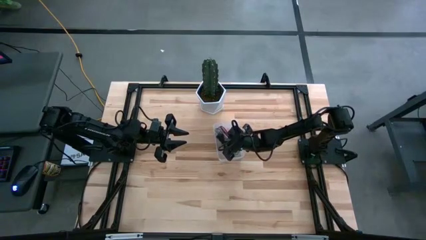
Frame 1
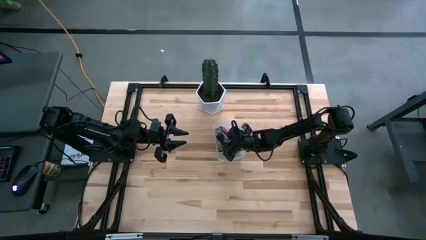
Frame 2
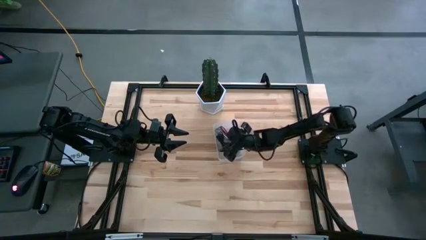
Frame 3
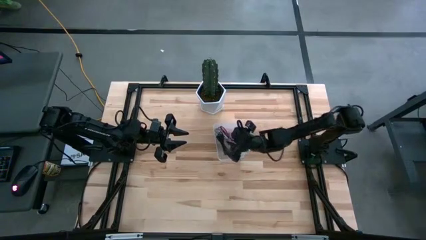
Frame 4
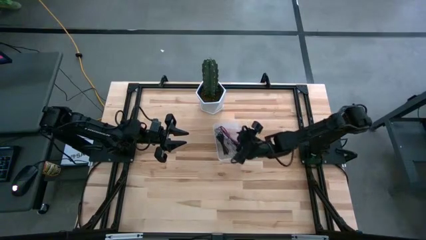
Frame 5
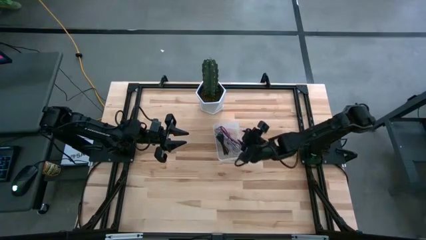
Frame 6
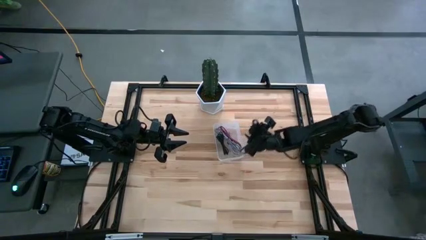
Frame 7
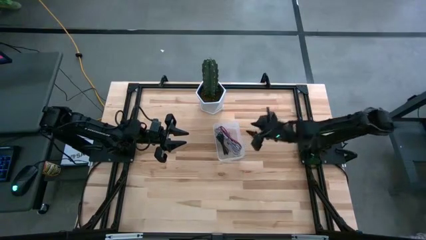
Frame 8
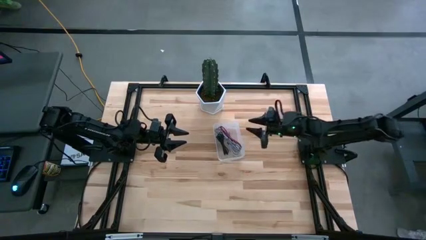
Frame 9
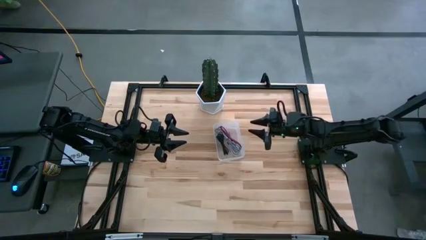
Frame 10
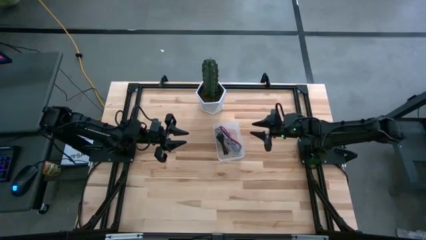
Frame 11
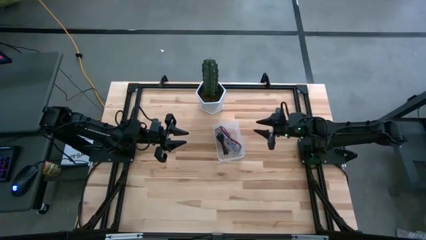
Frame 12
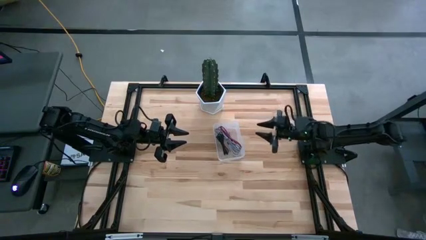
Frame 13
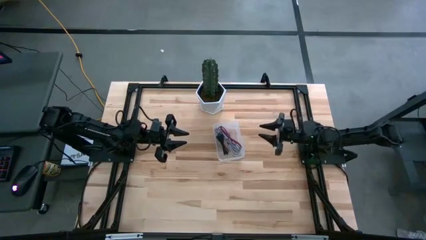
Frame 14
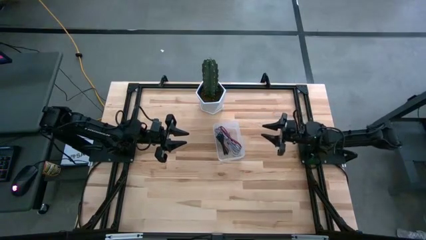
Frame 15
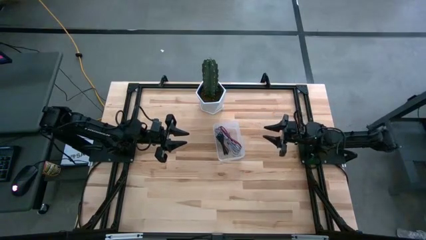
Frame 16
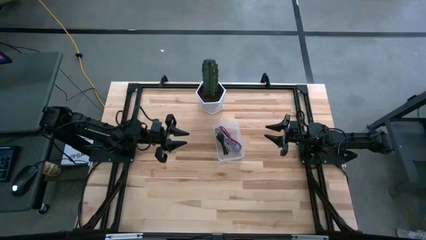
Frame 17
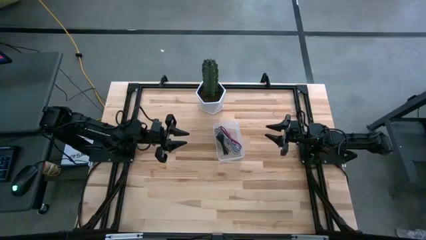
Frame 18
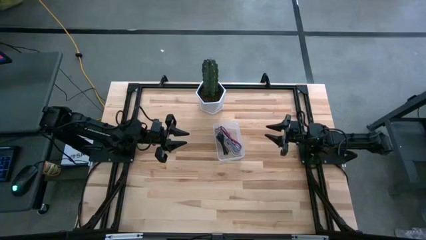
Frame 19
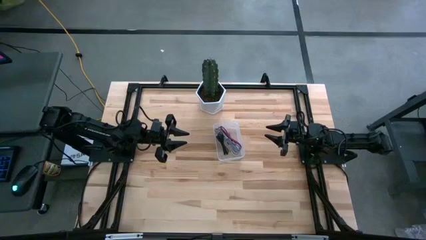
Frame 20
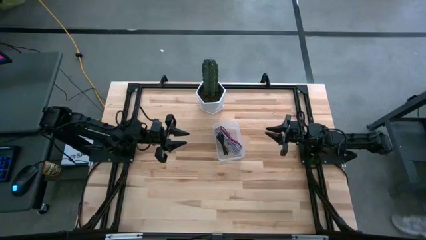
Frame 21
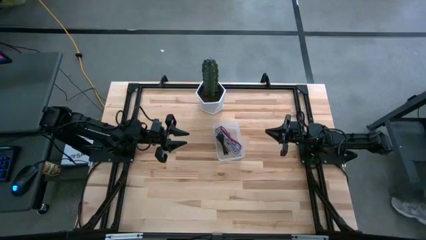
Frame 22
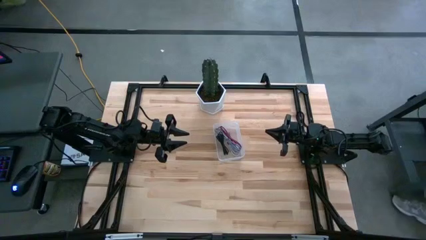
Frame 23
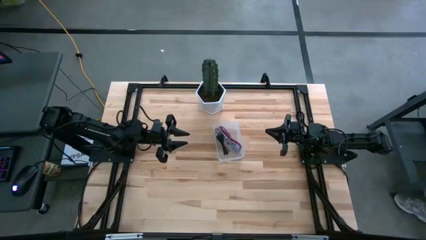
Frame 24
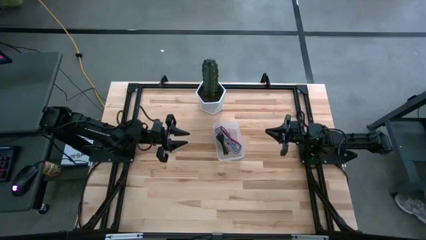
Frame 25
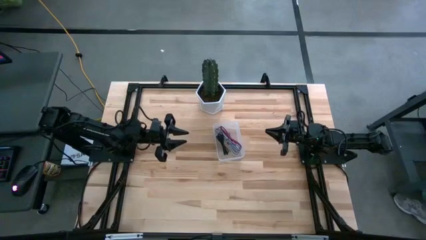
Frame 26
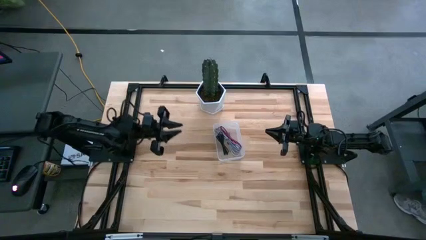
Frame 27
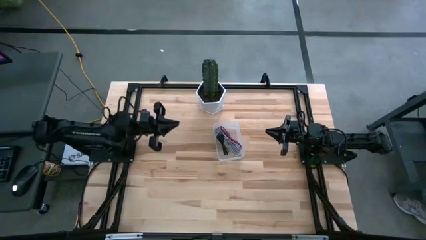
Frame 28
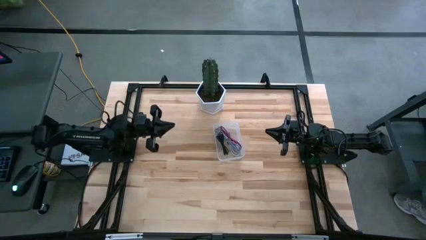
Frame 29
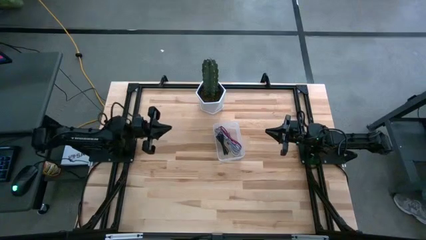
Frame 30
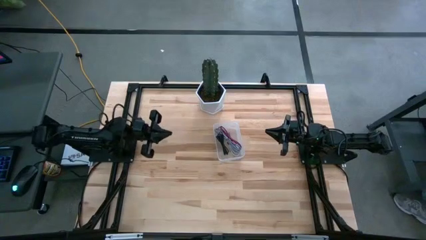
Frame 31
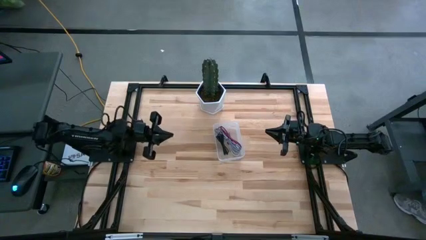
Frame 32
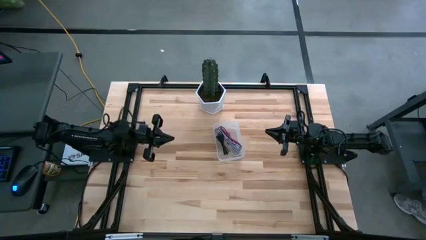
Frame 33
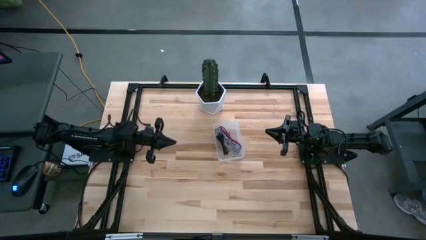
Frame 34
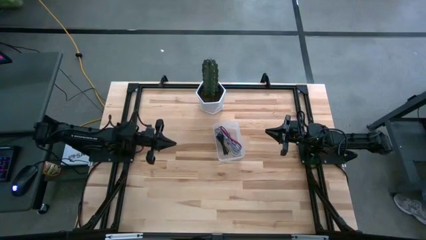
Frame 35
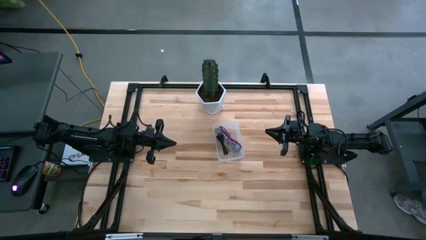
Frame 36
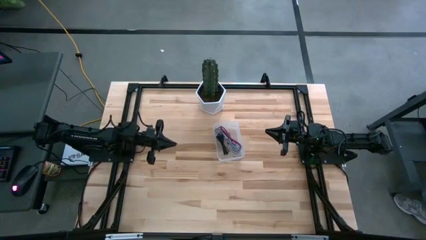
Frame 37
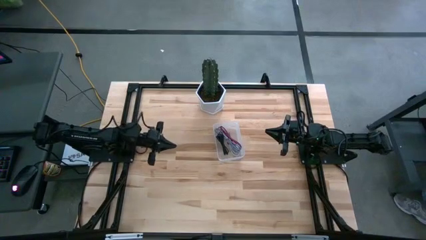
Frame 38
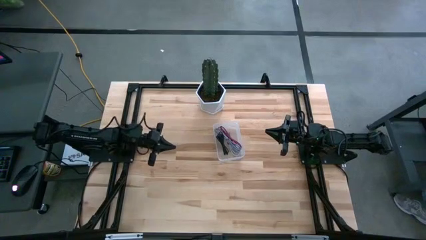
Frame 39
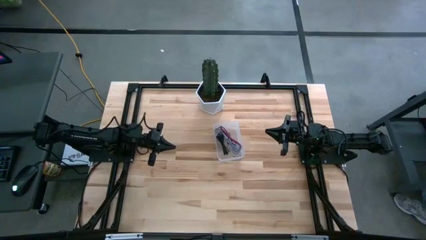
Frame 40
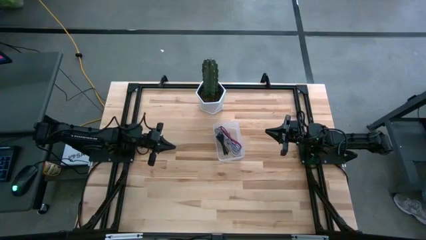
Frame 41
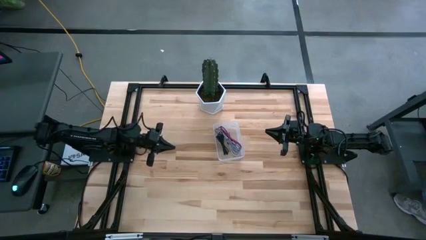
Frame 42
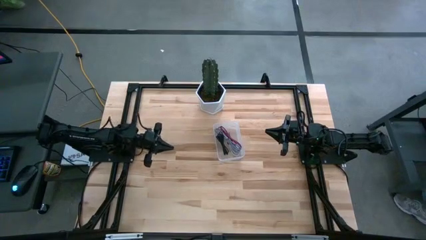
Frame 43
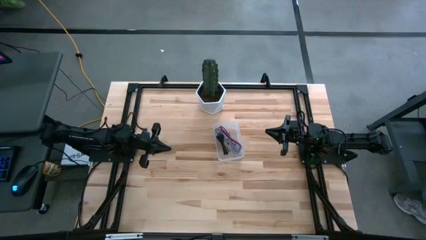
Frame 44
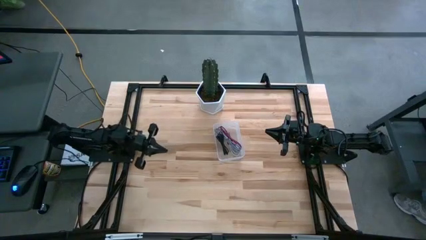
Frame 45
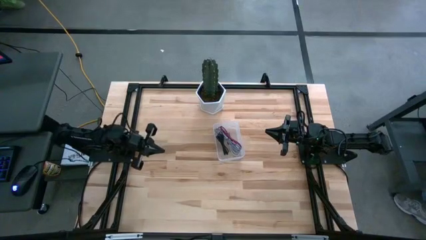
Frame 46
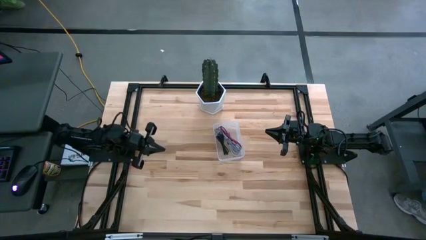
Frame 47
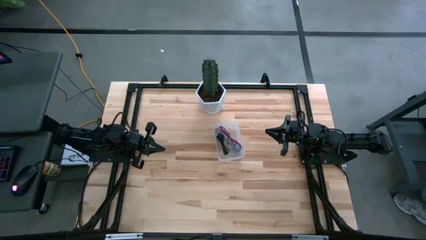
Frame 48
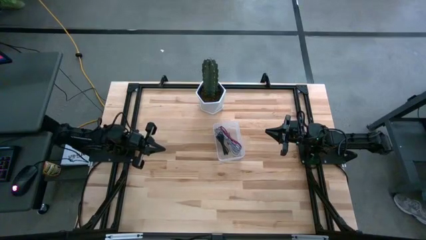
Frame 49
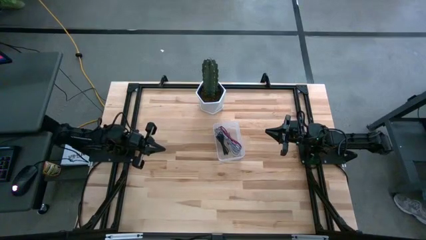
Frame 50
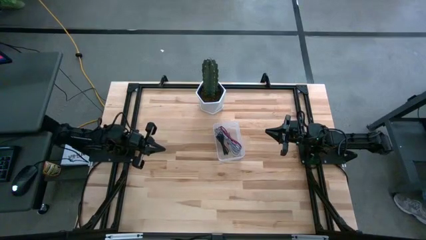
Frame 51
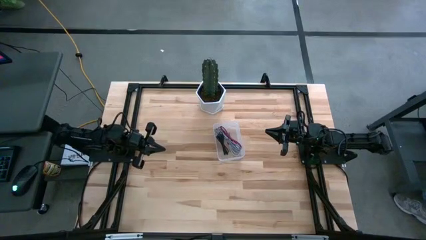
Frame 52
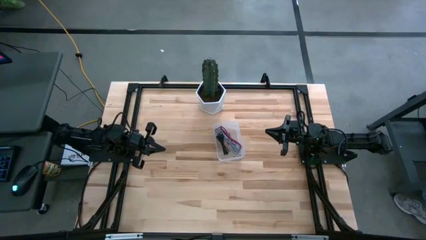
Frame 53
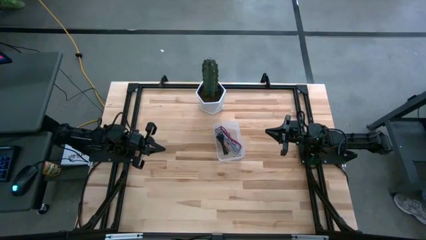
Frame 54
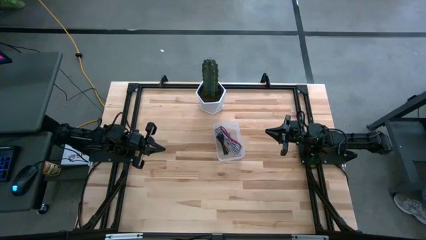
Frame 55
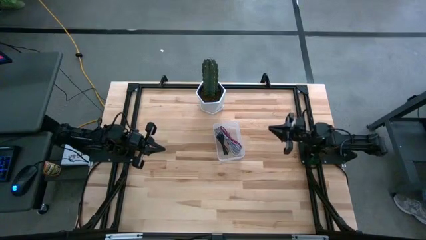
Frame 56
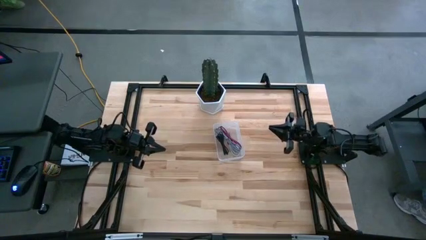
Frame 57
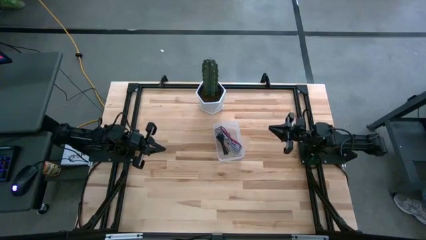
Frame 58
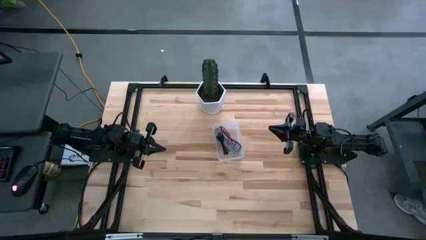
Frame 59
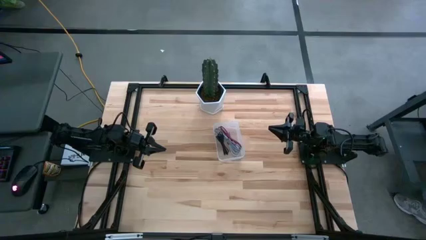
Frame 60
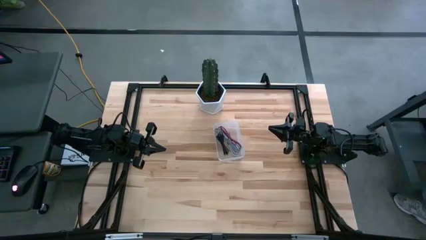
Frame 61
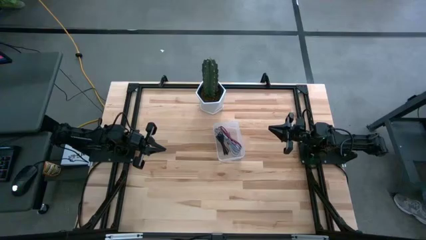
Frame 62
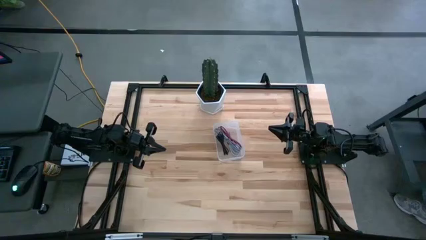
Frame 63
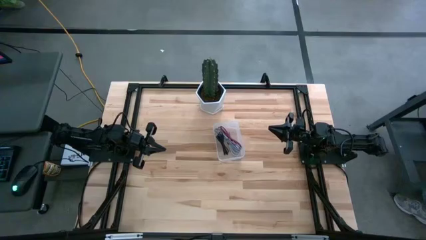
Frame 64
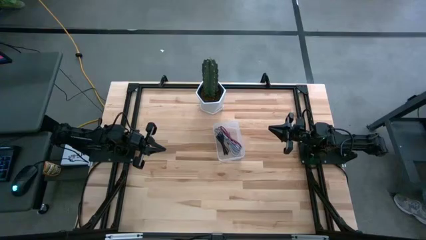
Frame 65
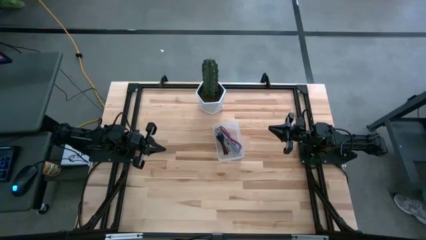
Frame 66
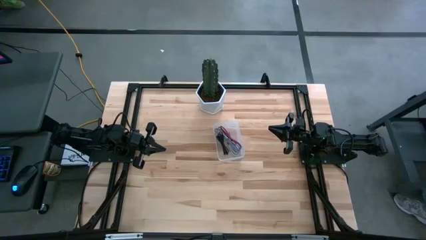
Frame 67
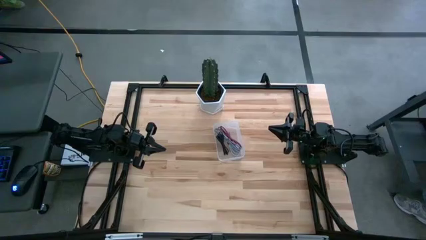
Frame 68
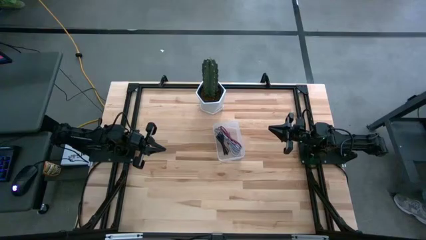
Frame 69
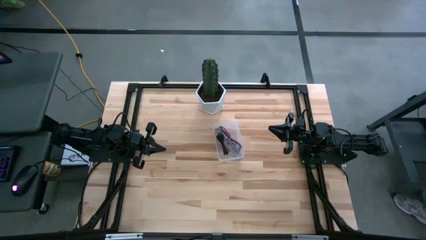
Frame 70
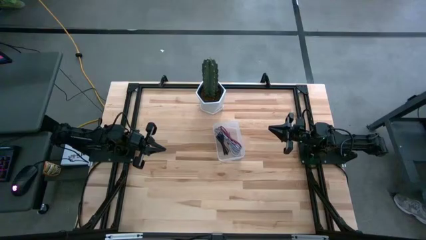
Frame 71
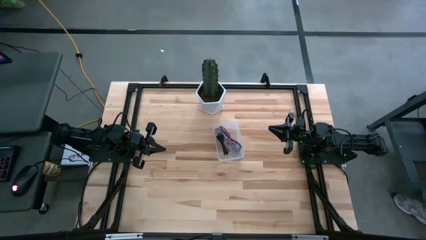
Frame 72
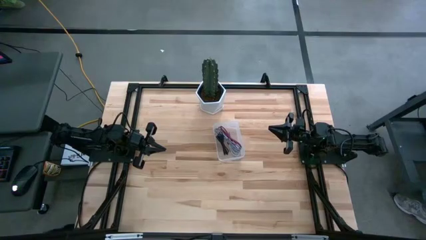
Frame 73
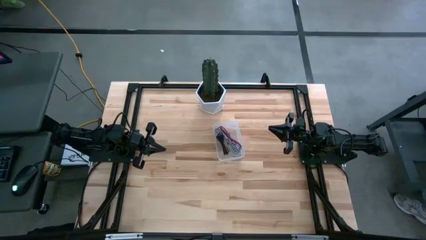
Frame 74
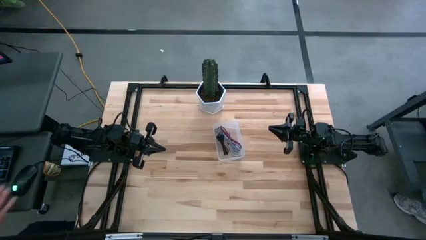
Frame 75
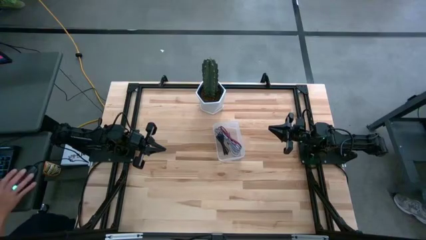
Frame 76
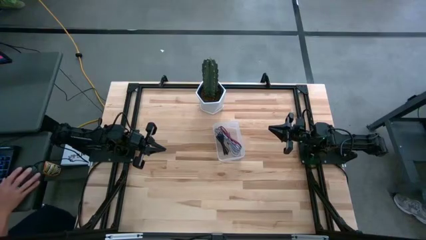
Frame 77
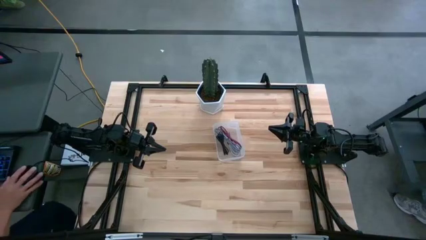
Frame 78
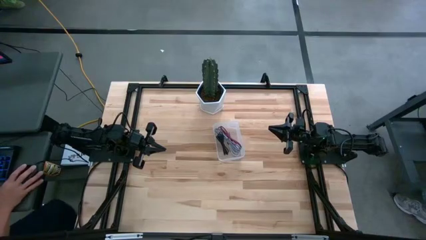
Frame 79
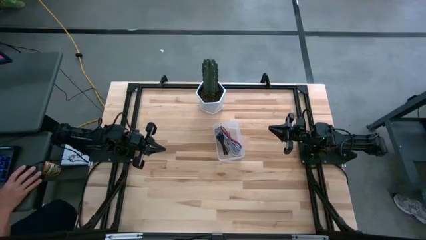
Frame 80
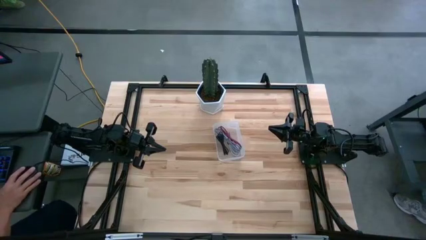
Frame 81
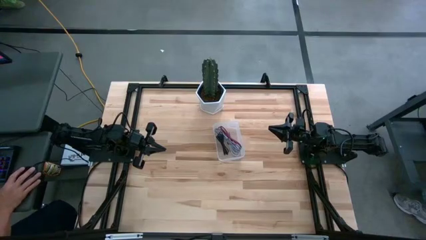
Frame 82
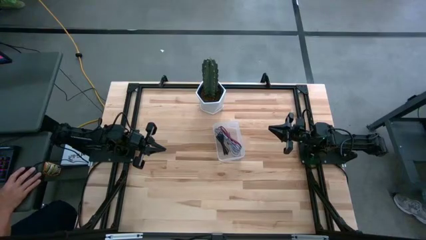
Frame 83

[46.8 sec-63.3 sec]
Task: Pick and place USB-C Cables
Return to Home Position
